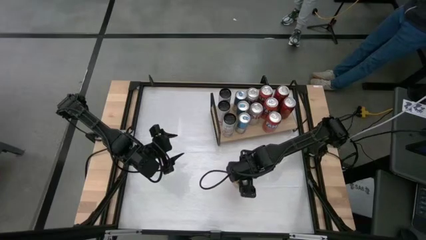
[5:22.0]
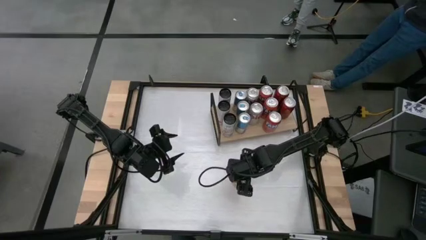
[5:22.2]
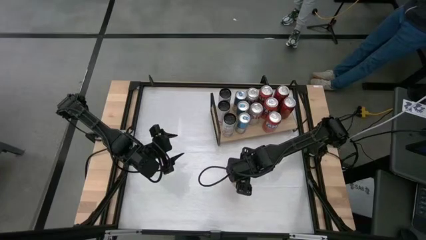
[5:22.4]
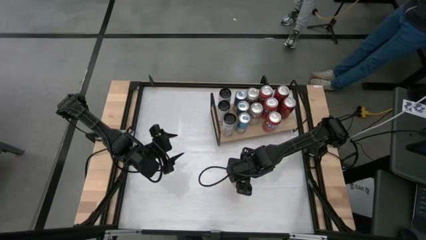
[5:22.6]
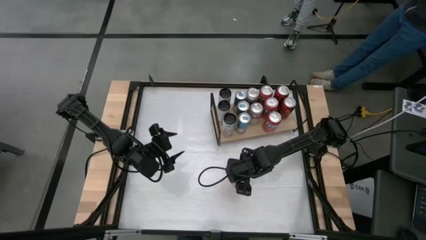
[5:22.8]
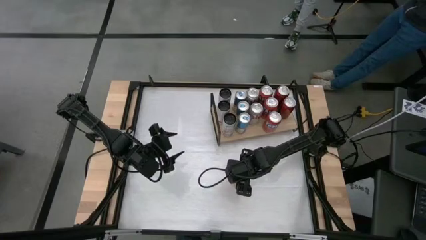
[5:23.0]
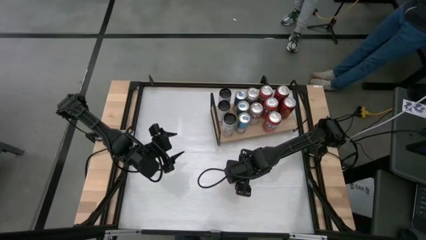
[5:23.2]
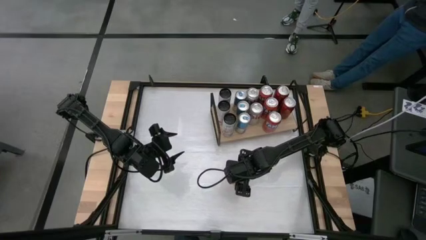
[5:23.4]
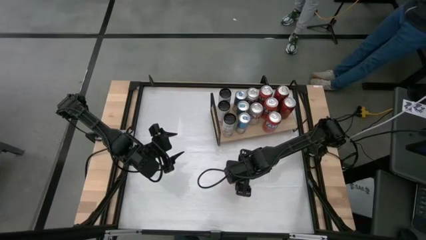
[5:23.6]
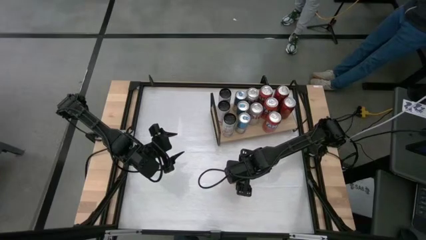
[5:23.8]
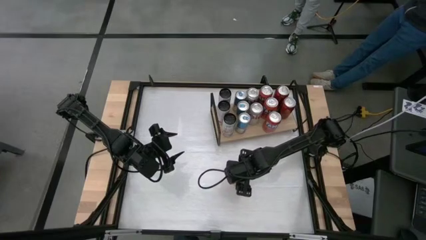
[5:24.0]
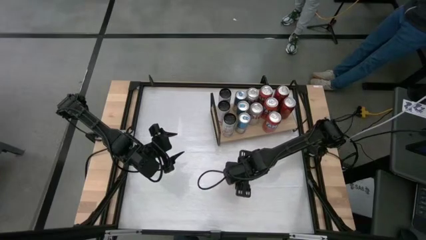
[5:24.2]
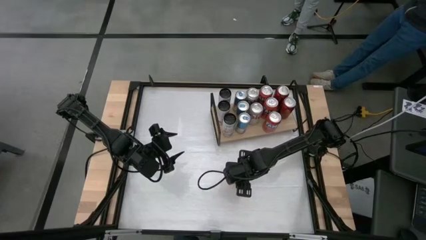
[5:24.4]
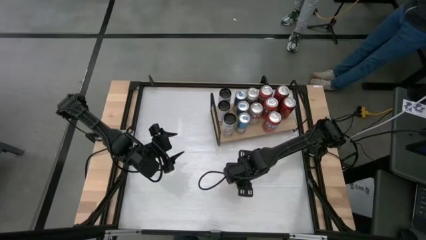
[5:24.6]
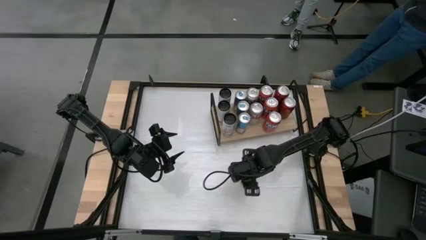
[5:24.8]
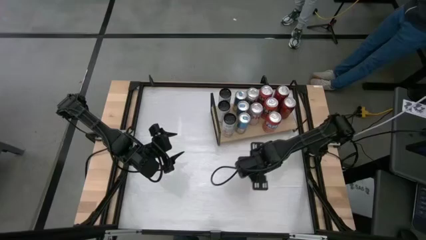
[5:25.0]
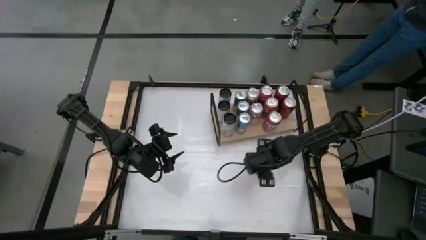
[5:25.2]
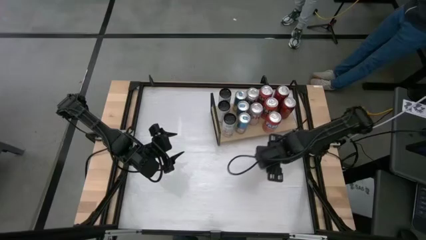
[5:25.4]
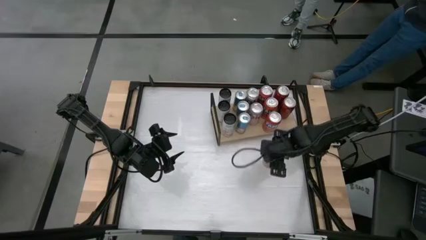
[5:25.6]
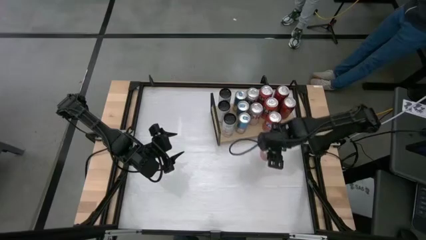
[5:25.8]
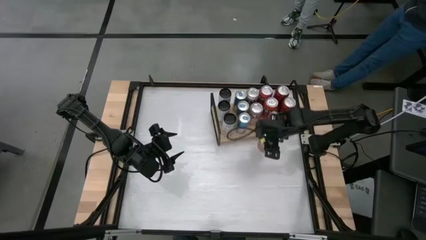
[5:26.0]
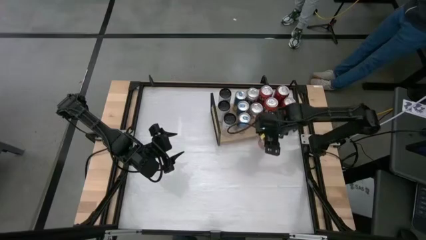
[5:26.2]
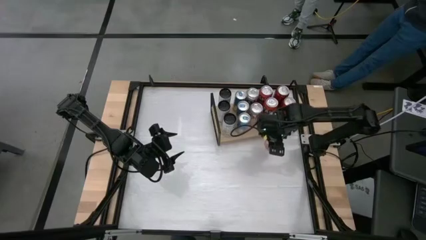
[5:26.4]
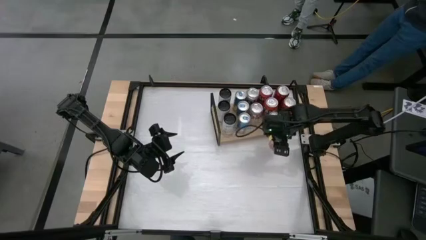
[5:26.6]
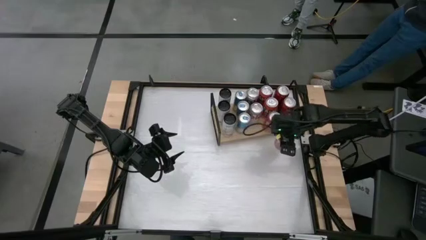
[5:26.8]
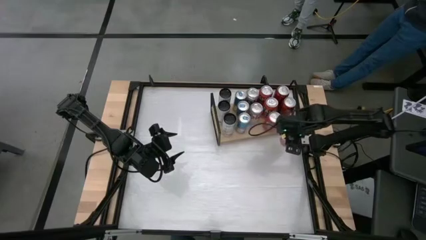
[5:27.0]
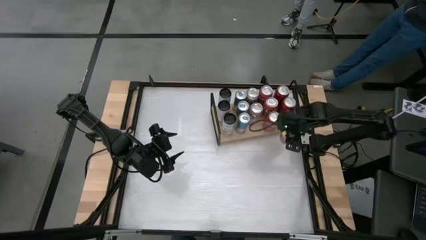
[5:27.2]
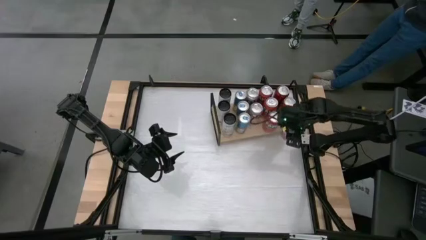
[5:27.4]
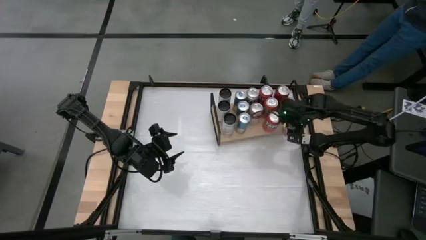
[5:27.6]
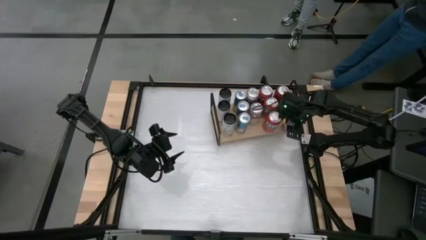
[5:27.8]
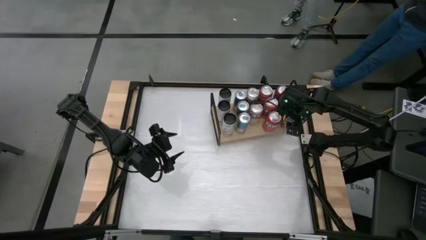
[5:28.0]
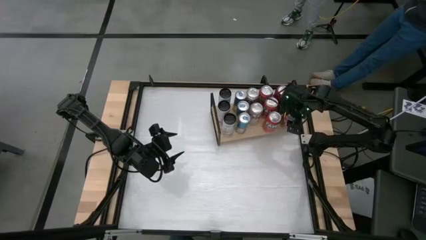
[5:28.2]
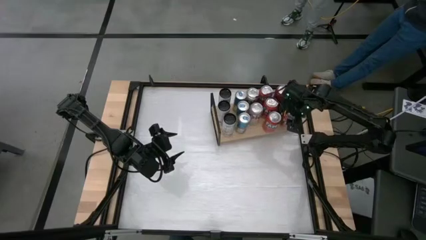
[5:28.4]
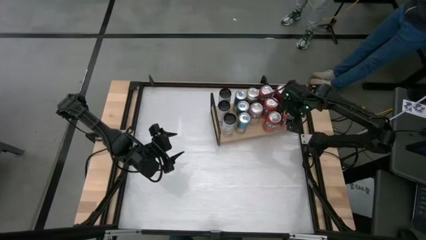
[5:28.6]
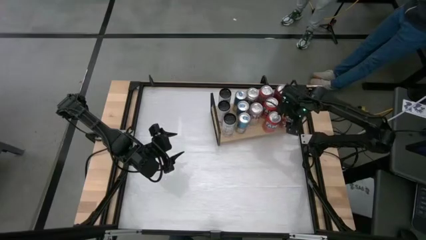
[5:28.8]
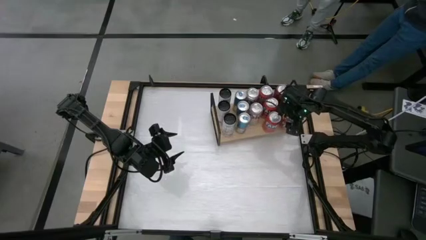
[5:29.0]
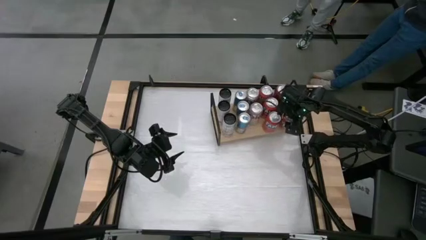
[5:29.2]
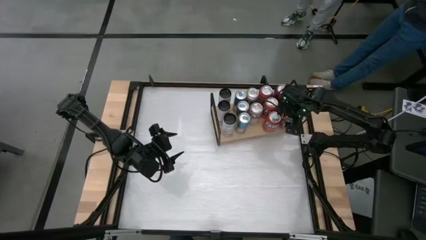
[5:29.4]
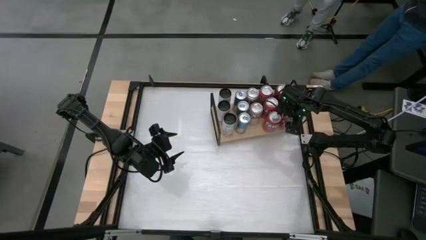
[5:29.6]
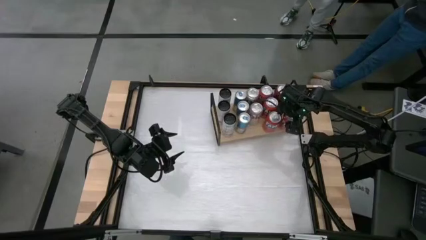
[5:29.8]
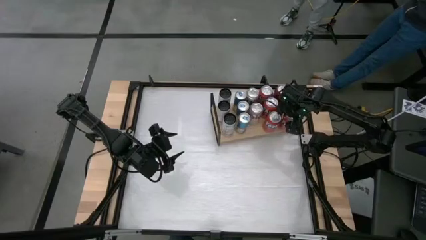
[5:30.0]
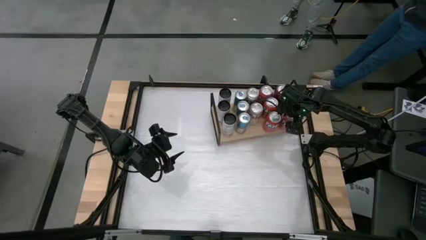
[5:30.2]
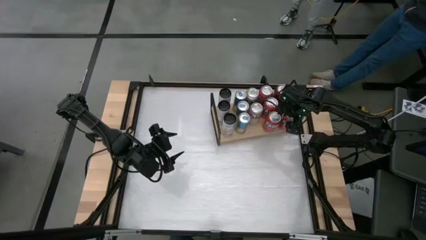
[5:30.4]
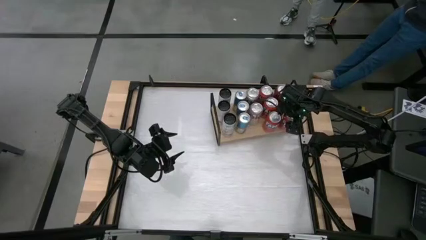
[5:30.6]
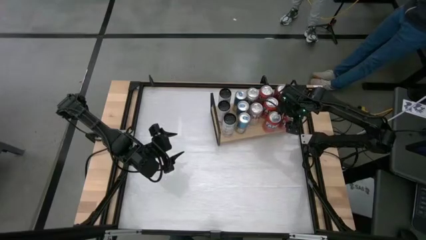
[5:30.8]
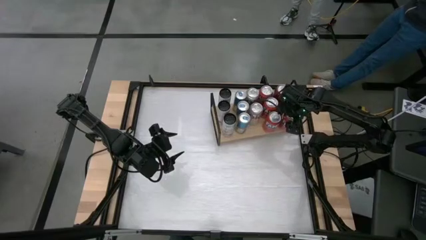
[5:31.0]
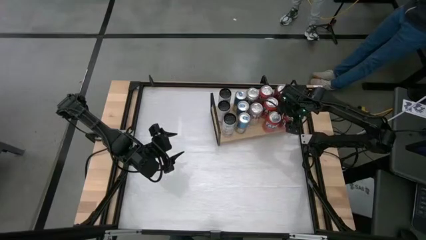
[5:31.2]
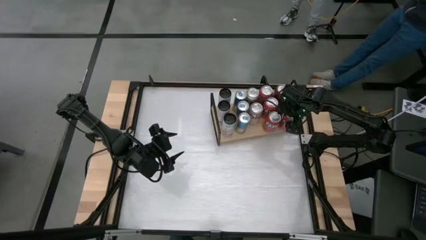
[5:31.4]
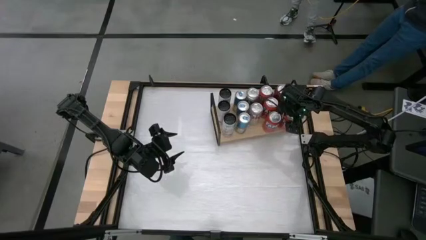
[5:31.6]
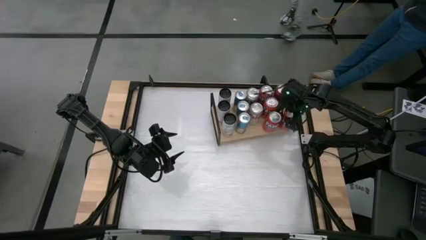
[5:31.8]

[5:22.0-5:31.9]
Task: Place canned beverage on shelf
Put the orange soda can on the shelf aligned with the red soda cans

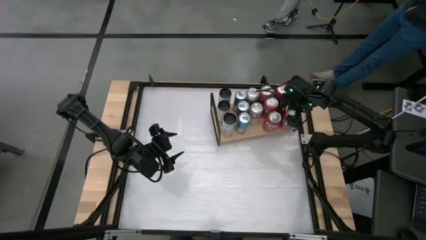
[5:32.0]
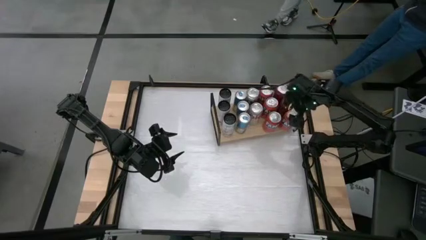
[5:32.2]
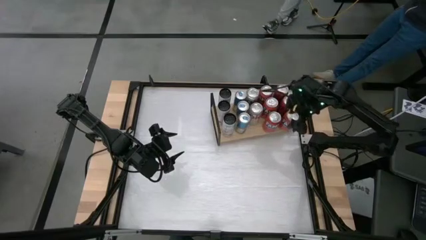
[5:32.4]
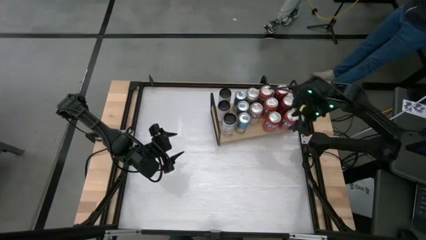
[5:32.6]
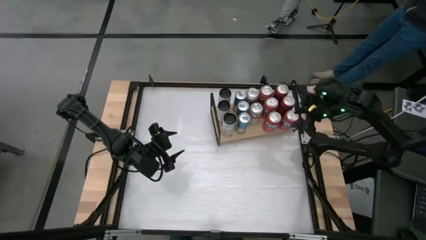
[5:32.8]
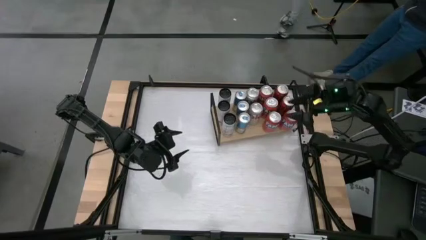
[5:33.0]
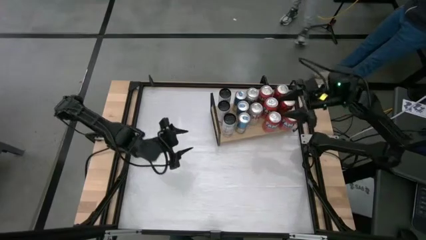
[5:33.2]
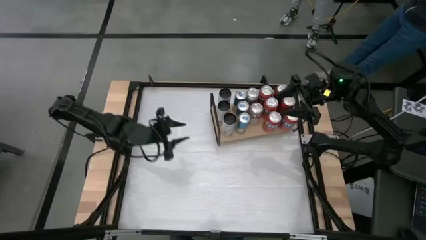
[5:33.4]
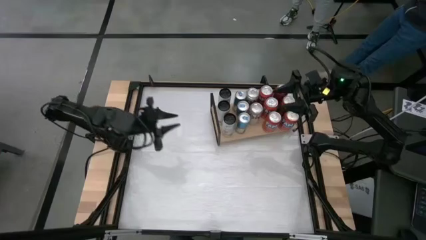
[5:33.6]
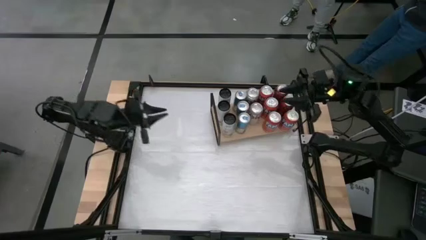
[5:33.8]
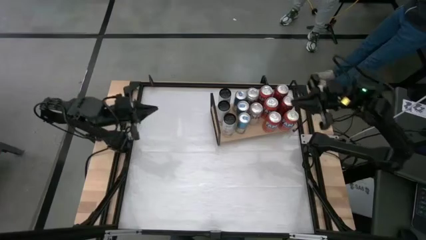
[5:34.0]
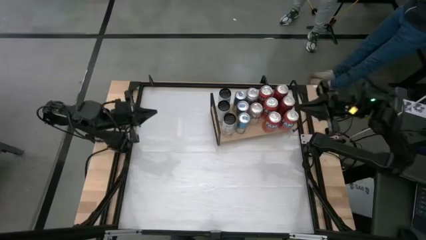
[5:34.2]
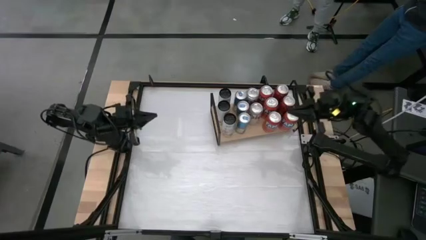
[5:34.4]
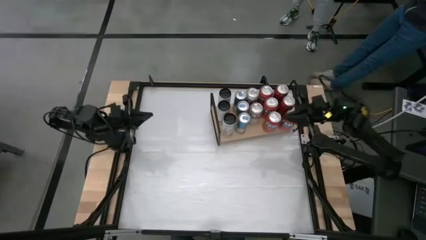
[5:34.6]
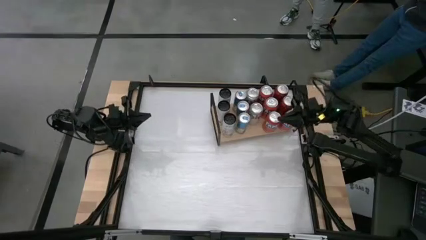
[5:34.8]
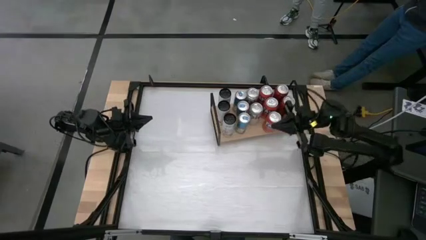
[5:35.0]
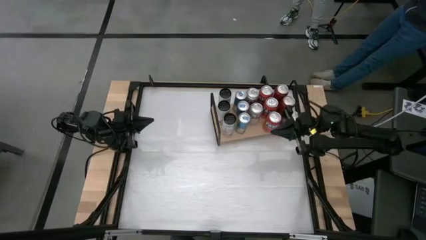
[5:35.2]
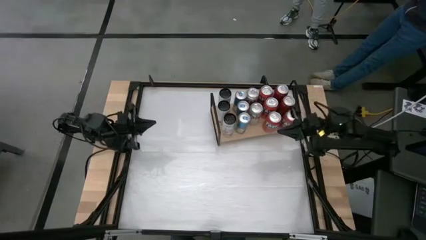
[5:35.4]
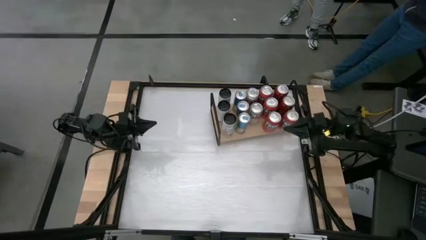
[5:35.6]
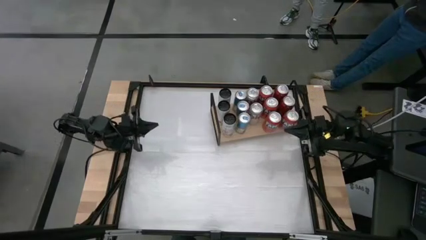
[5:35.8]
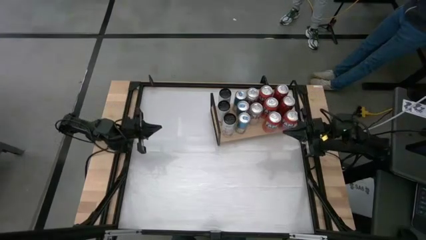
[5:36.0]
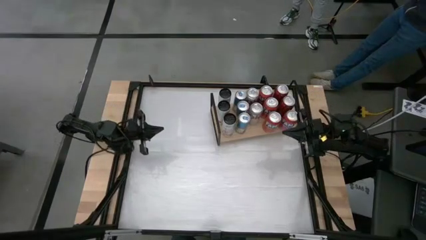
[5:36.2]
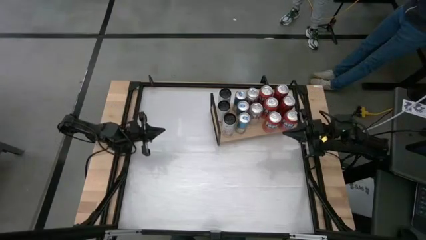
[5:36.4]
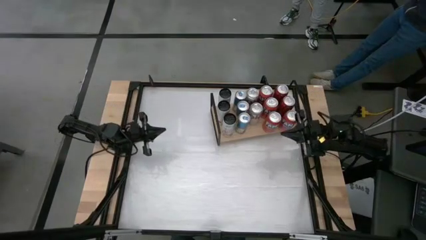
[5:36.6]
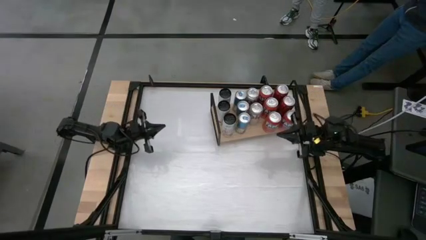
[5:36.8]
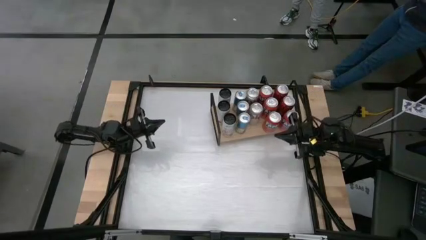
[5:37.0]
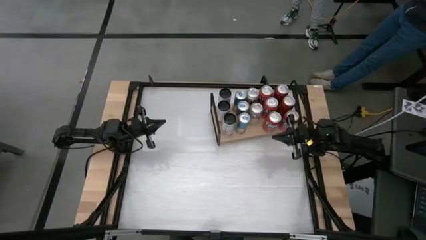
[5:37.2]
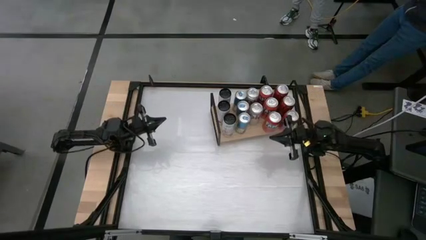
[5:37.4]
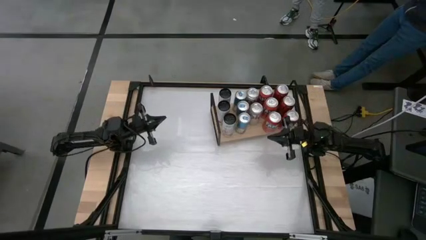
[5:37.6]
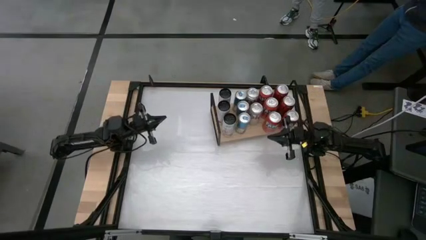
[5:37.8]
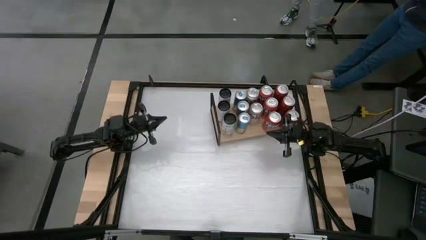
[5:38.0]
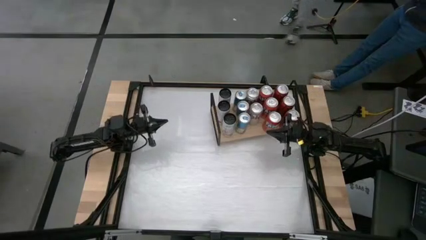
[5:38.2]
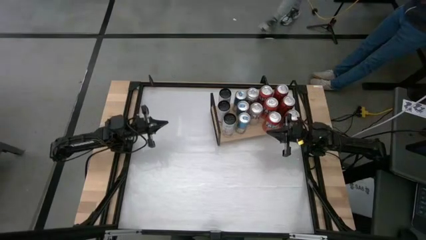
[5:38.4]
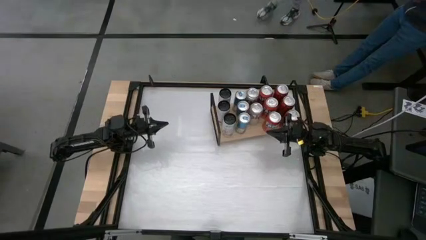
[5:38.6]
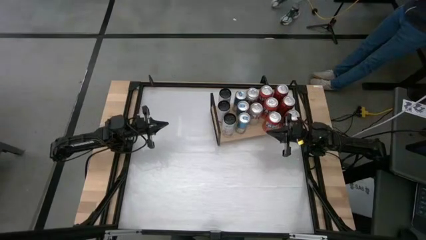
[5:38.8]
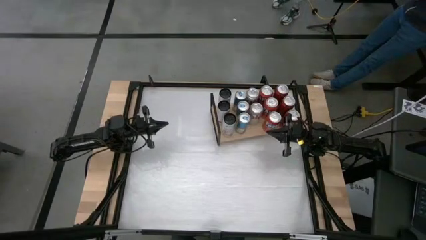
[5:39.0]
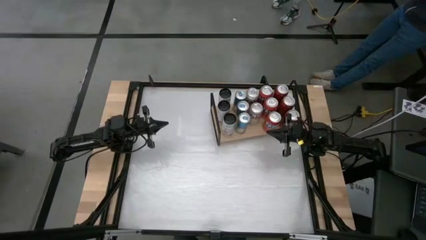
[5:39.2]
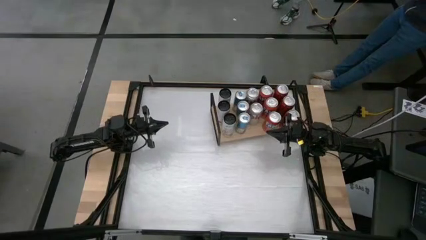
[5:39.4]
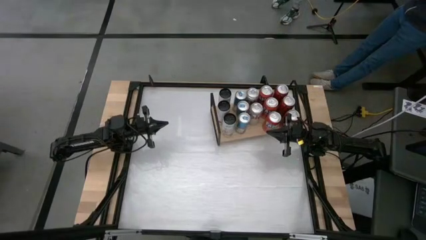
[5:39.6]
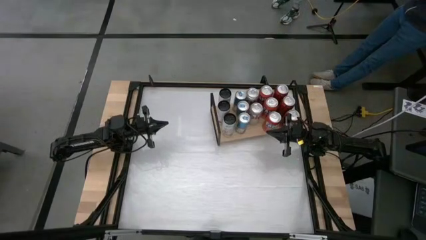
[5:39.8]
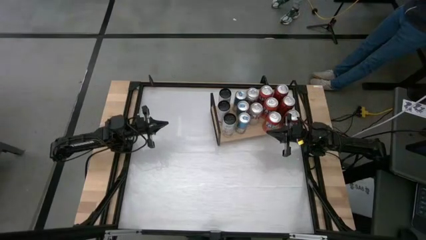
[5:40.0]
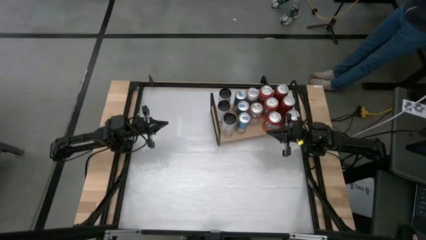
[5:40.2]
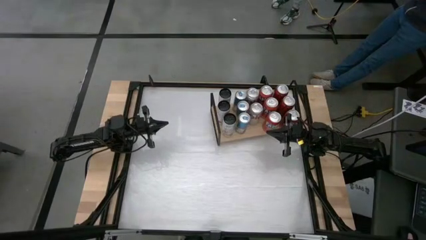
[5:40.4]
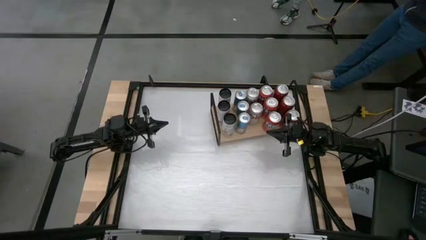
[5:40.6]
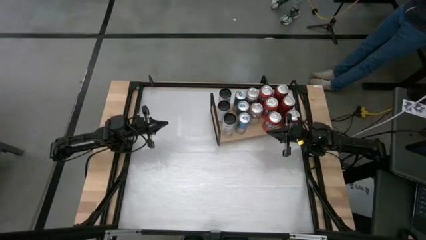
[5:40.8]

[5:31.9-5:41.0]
Return to Home Position
